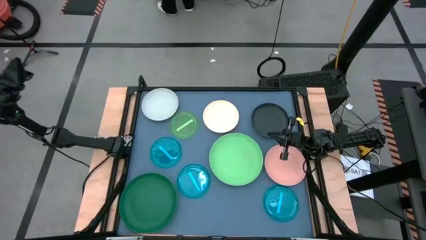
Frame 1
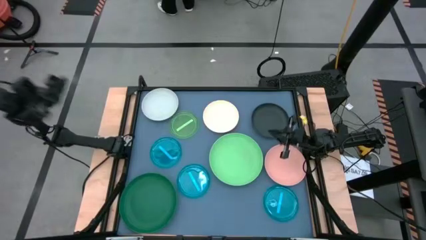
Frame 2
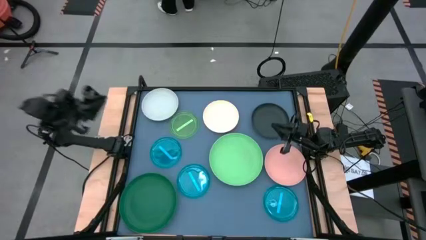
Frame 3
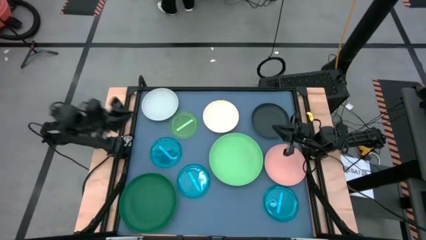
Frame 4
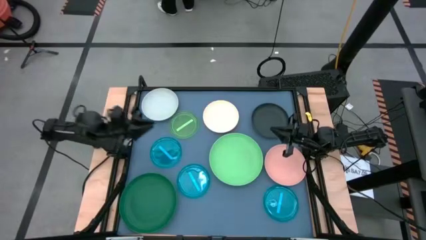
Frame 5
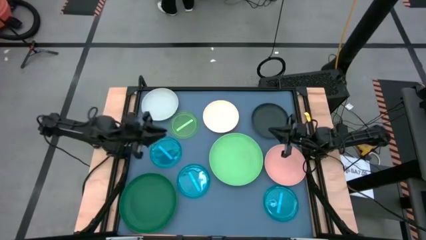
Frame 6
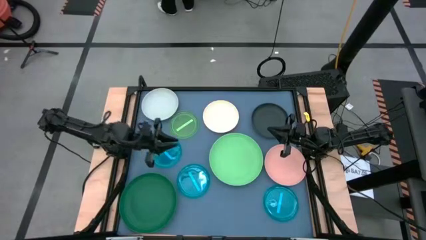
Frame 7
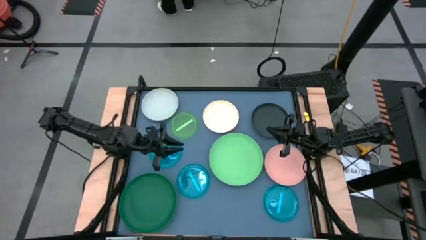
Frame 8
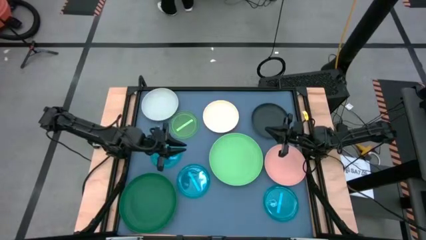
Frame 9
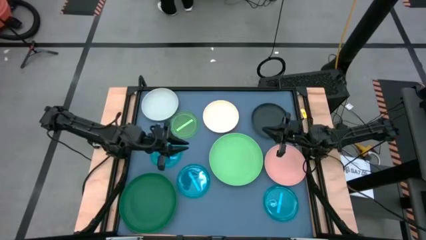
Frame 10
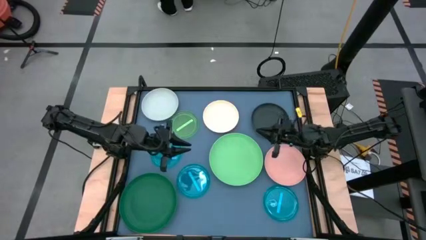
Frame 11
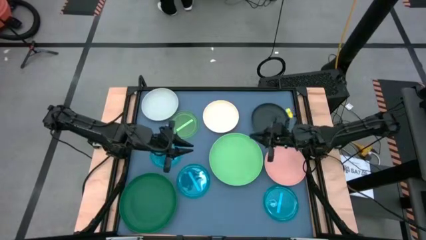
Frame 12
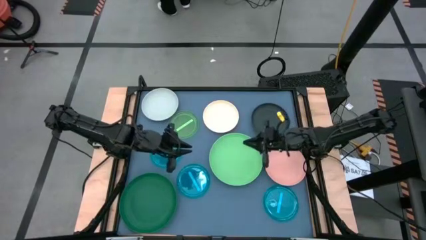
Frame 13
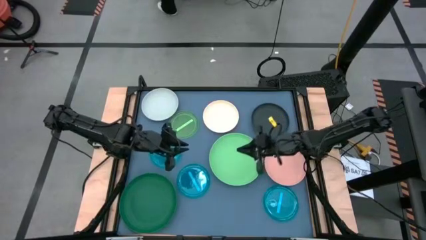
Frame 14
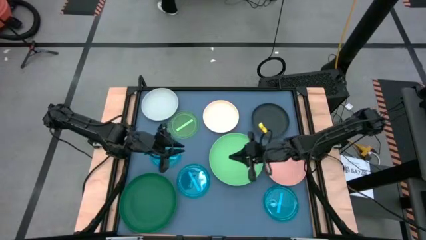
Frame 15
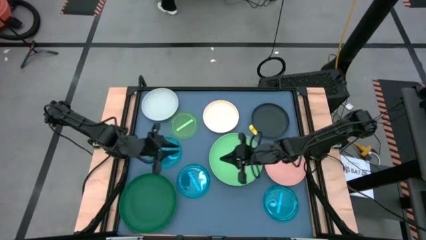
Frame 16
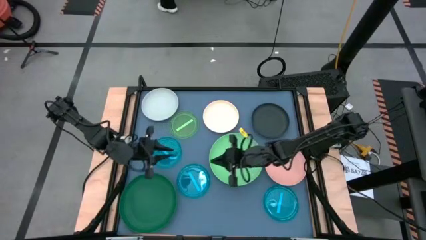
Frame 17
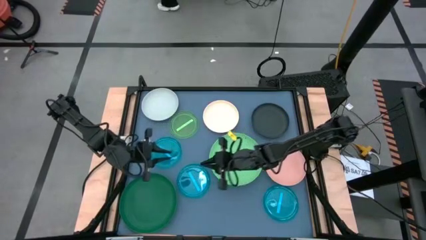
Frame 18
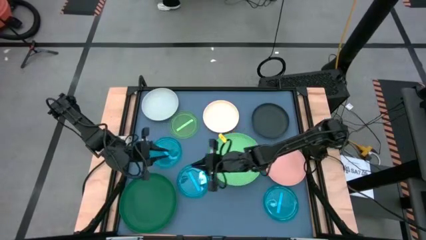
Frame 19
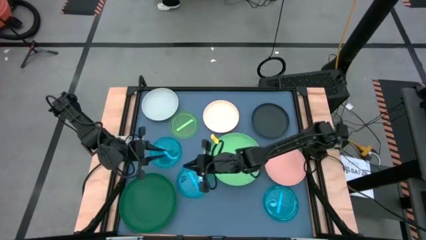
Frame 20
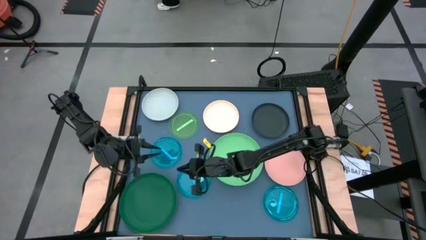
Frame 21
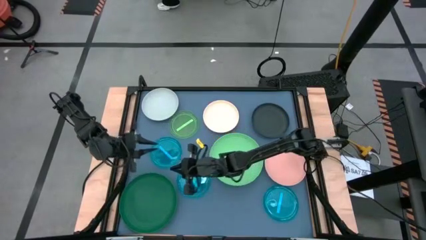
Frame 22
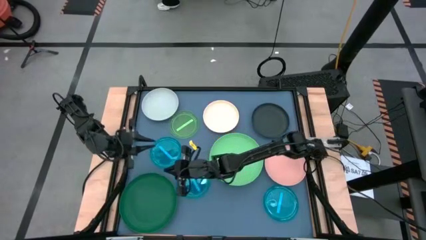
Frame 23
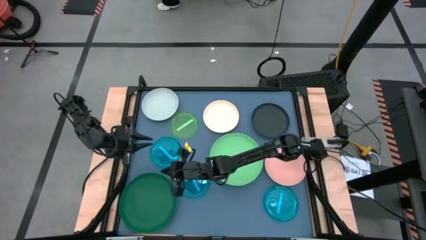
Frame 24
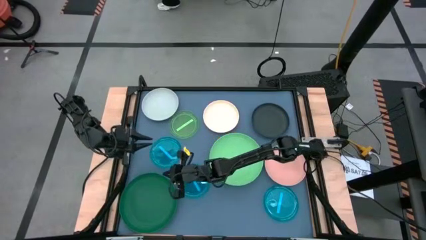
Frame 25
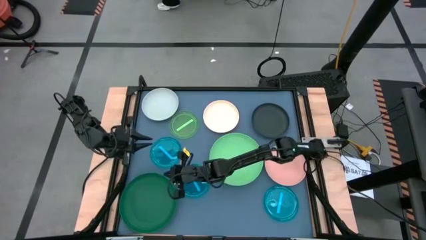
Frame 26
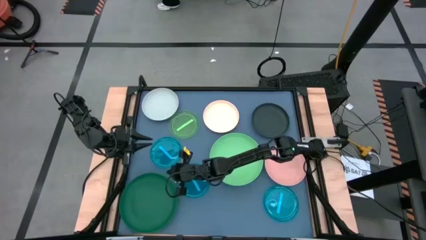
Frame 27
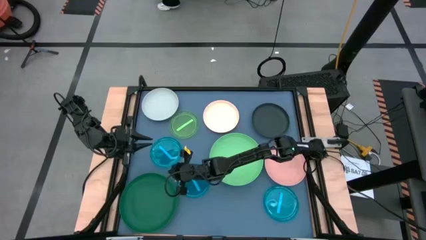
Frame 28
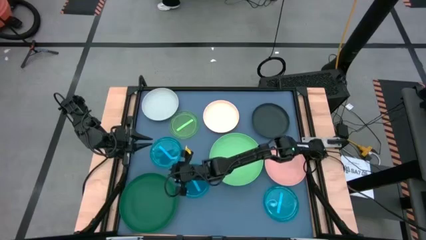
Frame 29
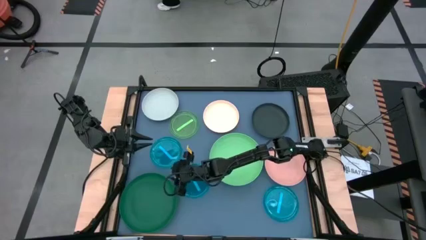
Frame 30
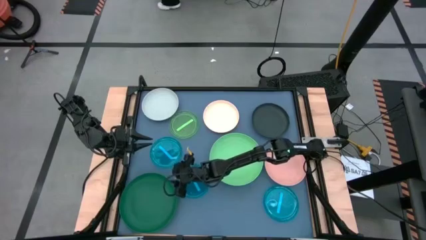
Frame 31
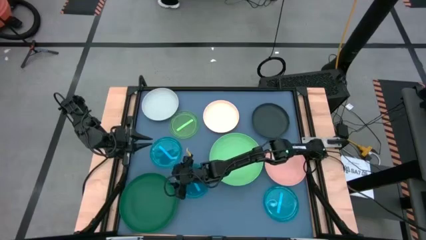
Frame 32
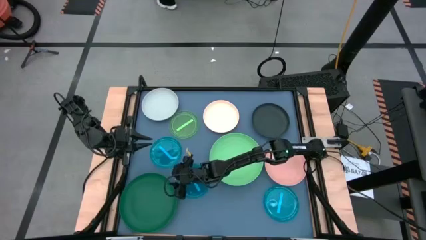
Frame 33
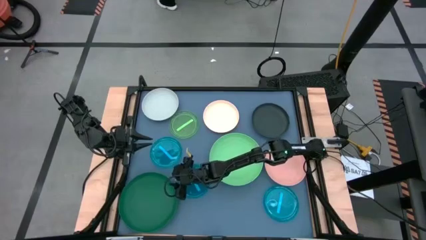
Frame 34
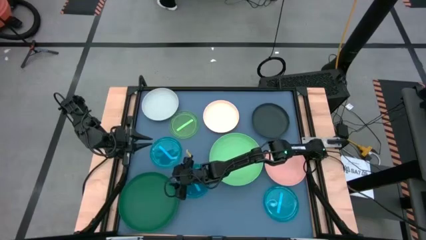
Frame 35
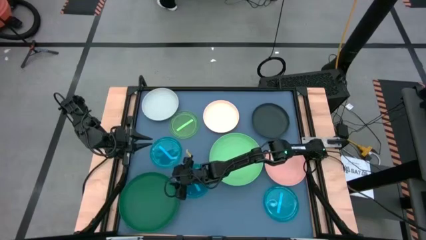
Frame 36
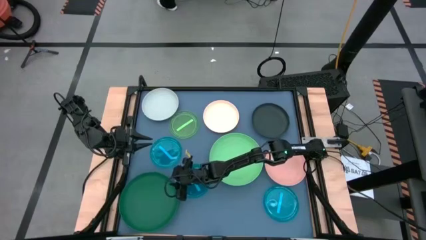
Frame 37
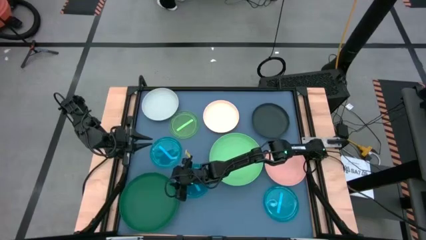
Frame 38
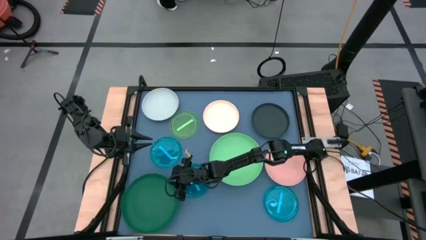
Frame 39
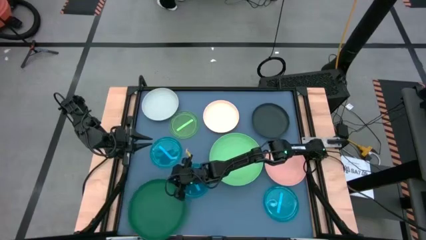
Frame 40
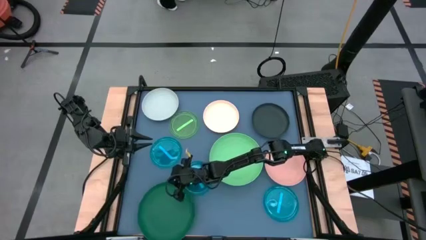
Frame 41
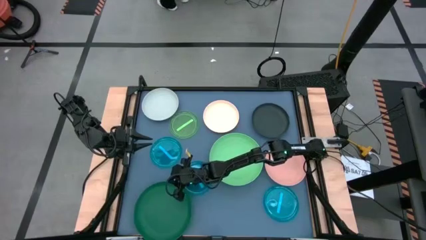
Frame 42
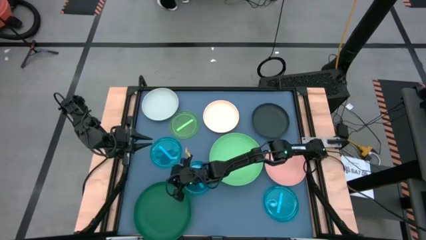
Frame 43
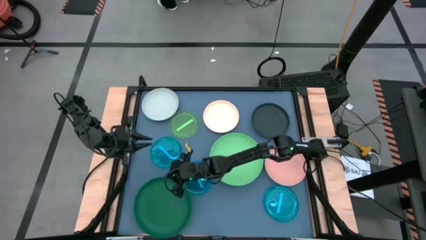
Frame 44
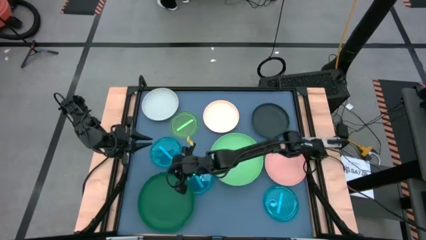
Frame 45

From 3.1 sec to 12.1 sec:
Task: Stack plastic plates
Stack the dark green plate on top of the green plate

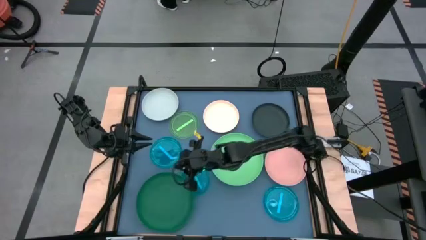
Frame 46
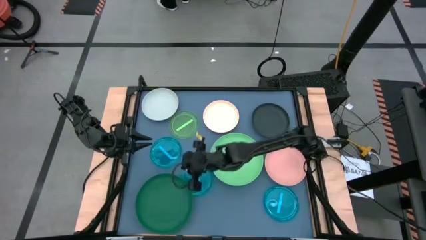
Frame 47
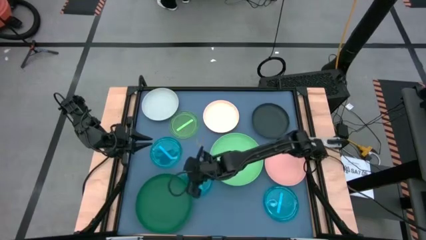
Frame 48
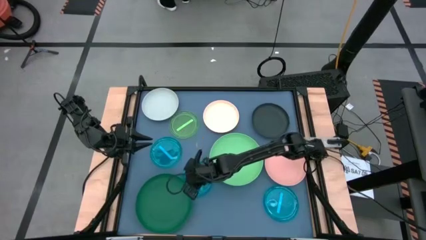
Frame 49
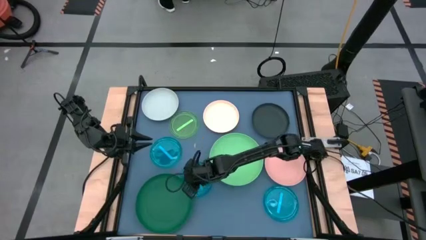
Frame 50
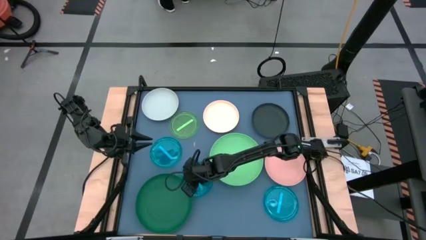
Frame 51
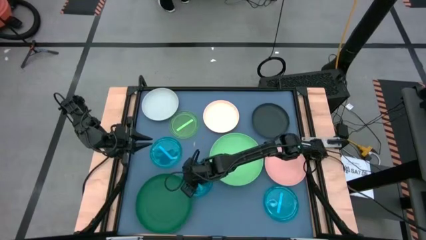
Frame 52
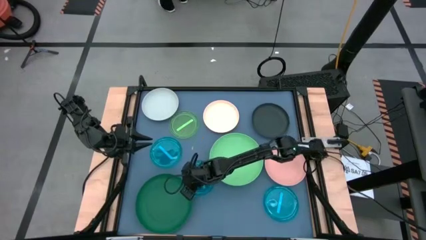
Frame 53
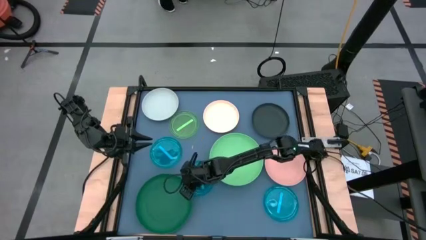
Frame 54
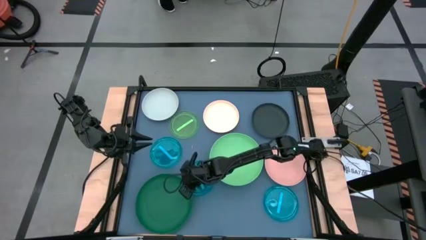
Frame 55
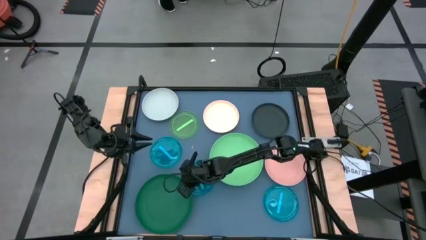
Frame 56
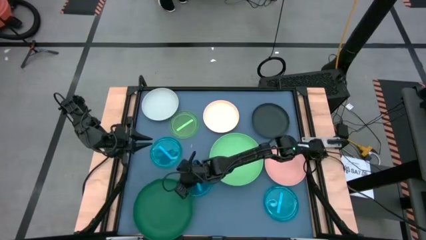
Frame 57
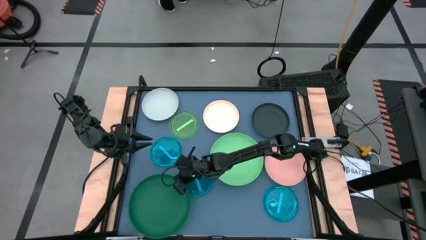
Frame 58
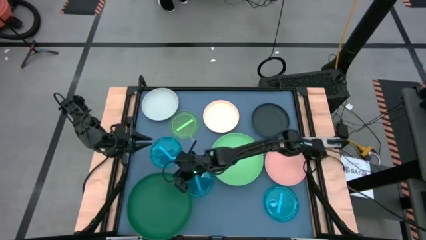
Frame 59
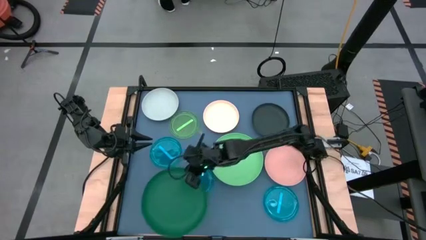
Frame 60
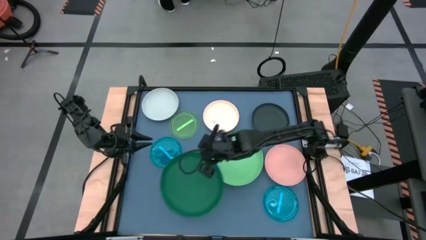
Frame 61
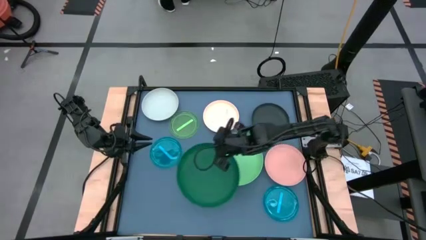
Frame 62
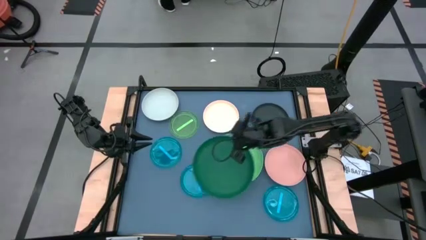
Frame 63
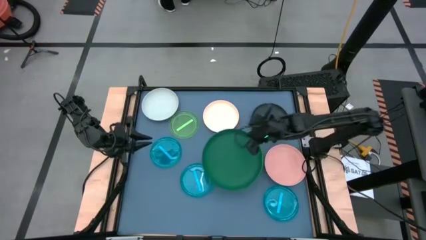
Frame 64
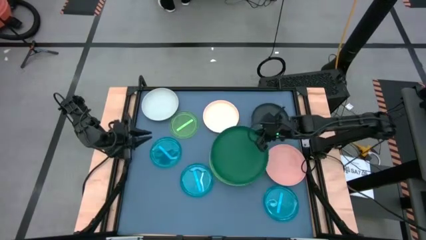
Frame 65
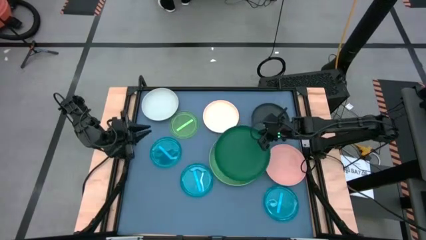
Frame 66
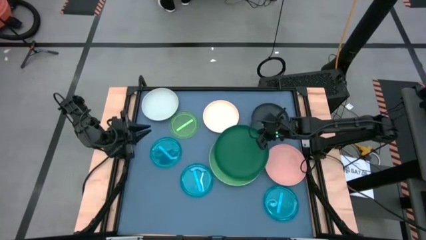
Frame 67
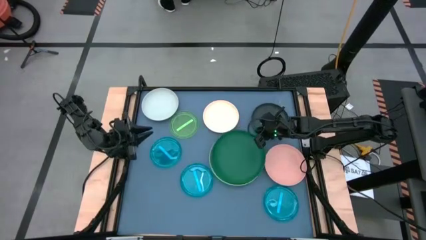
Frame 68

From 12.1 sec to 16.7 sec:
Stack the dark green plate on top of the green plate

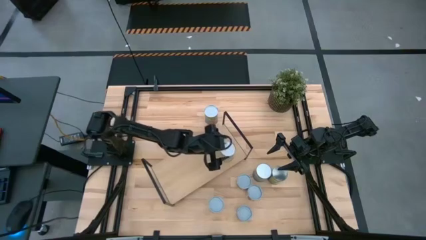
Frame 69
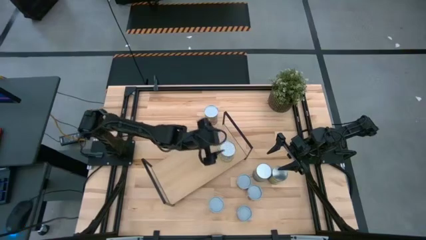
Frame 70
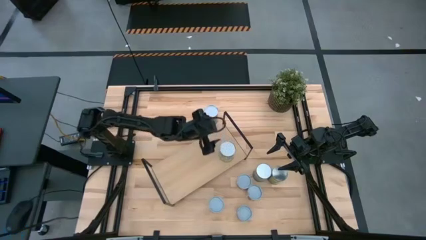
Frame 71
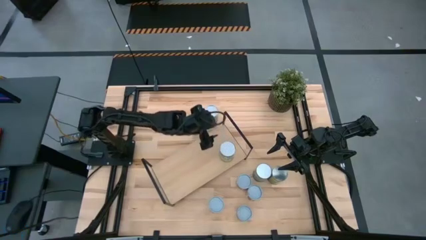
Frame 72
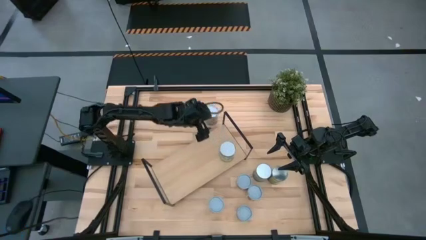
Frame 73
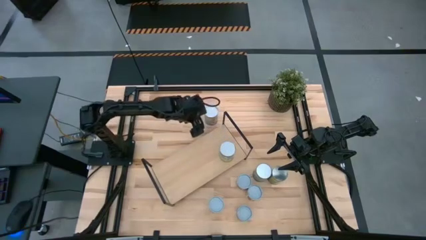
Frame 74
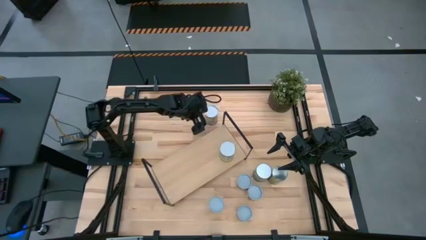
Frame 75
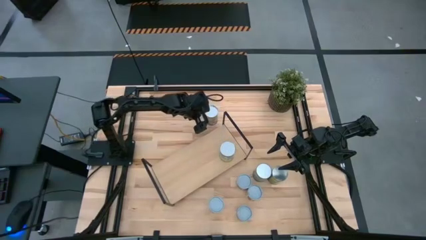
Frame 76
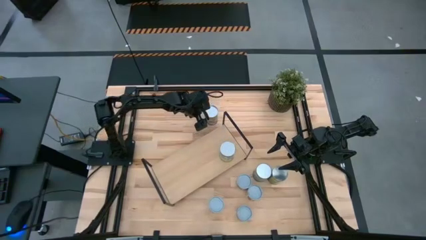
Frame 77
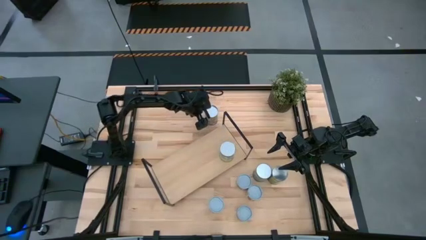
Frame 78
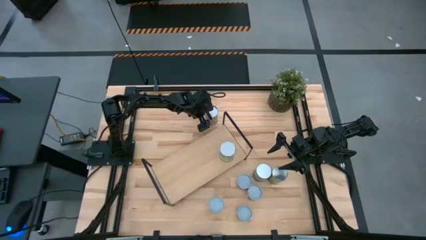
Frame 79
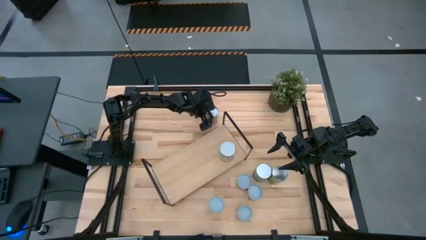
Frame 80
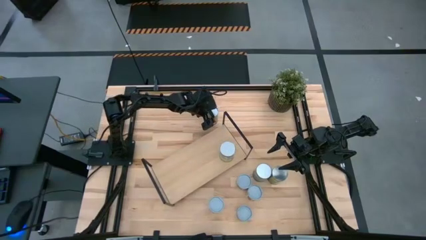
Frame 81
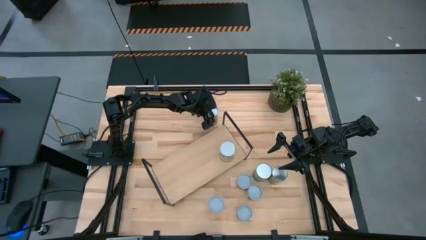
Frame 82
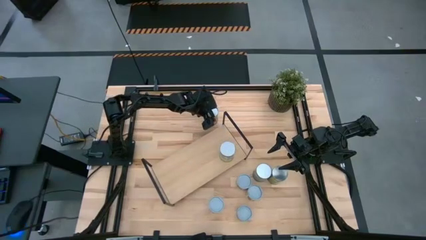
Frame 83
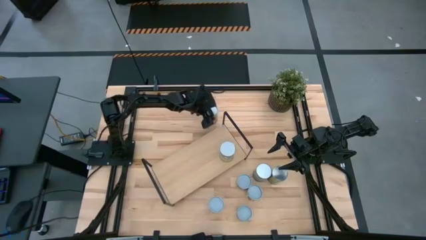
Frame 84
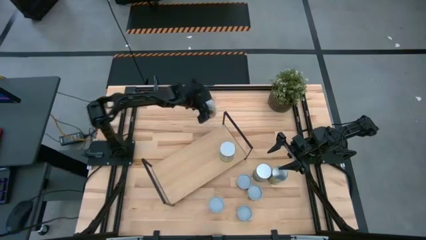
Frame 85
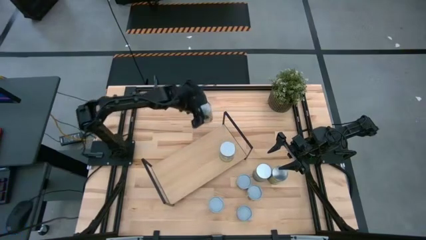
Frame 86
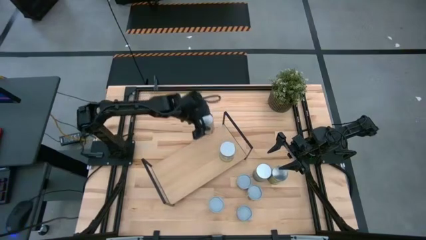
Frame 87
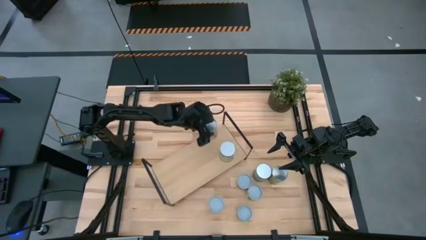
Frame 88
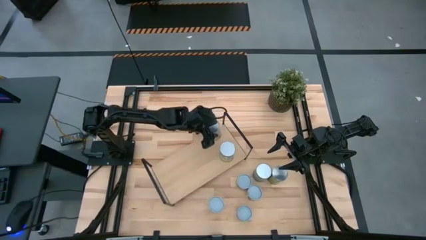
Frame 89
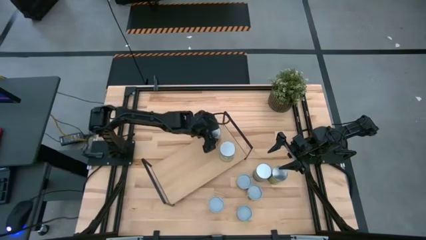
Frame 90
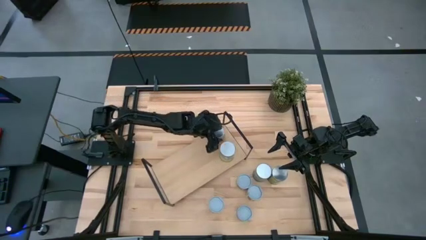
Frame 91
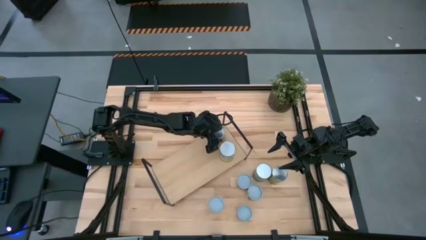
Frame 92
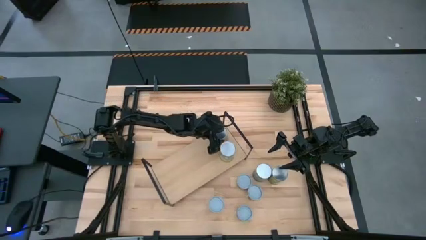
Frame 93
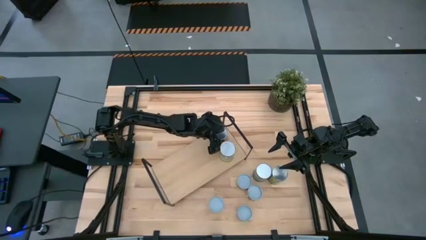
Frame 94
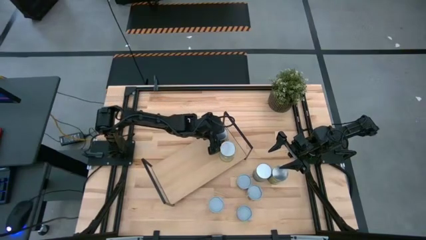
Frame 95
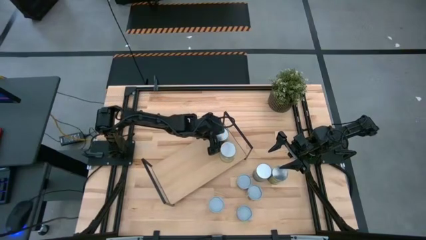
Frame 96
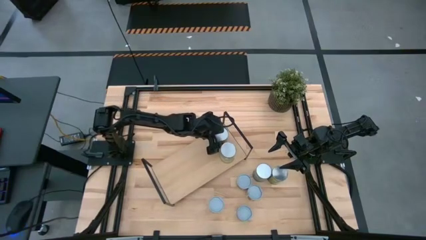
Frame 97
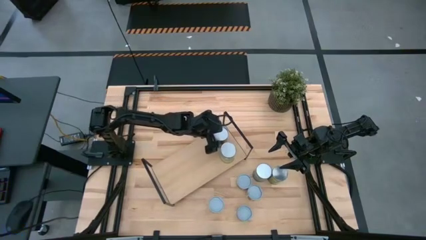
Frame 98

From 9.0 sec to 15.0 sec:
Task: Pick and place cans onto a shelf
Put the large canned peaches on the shelf
